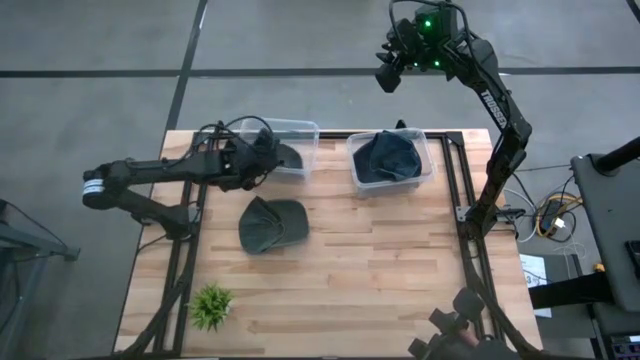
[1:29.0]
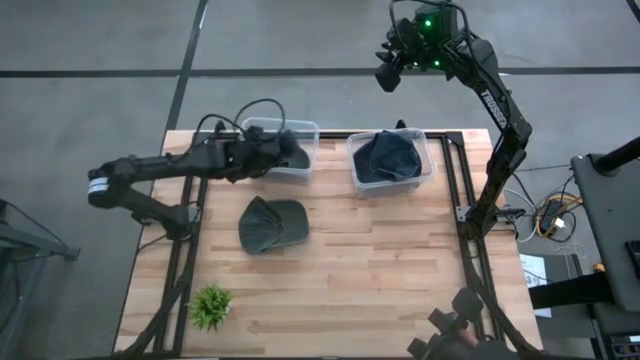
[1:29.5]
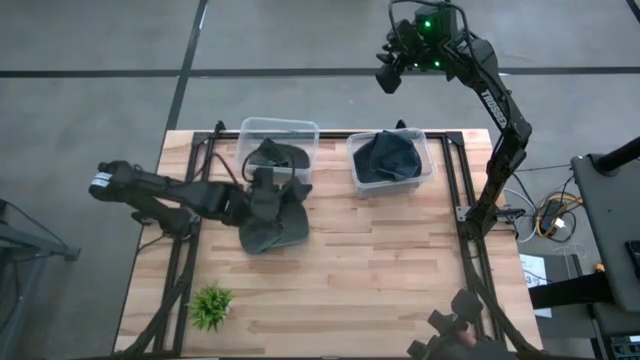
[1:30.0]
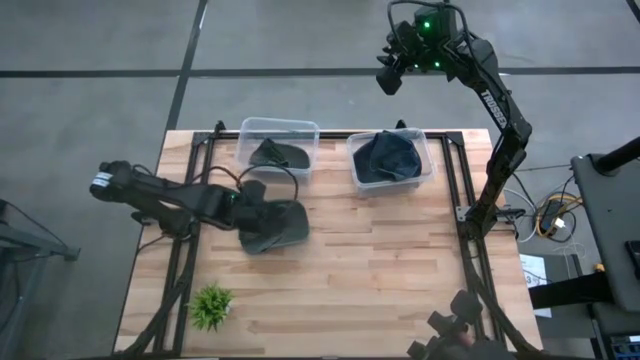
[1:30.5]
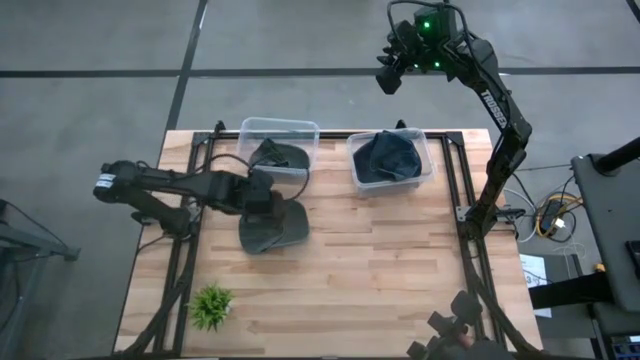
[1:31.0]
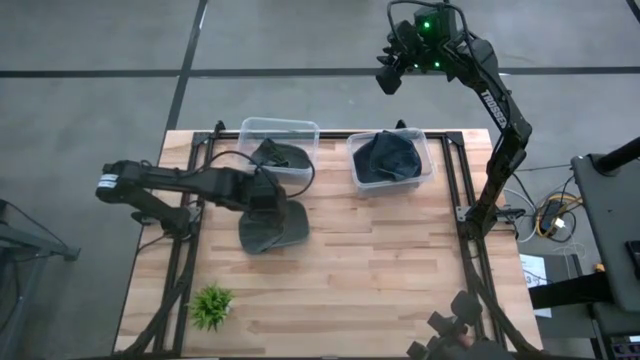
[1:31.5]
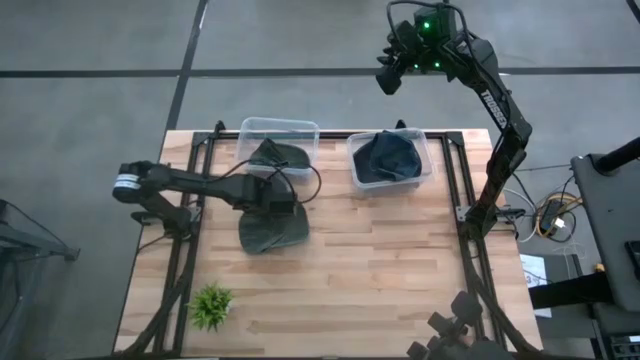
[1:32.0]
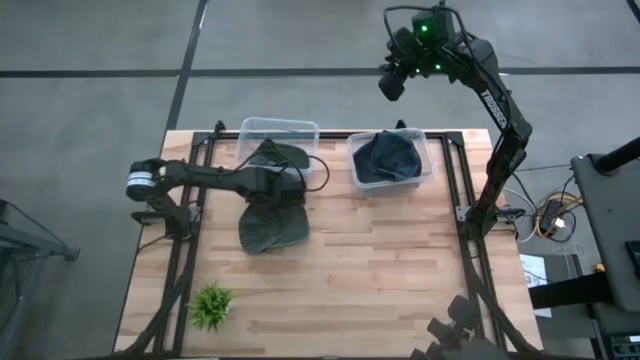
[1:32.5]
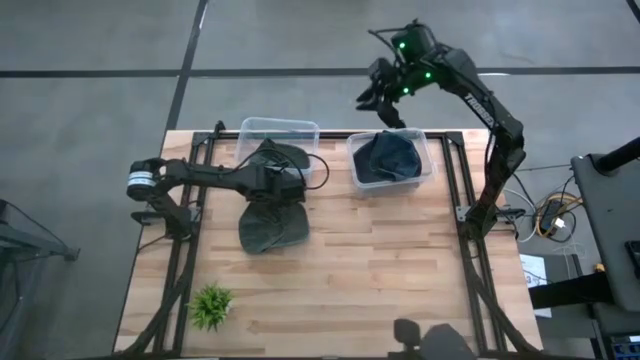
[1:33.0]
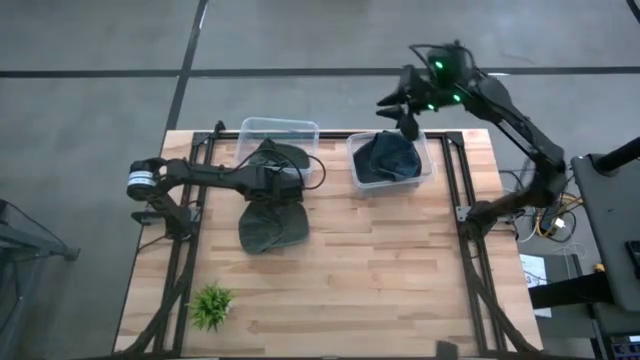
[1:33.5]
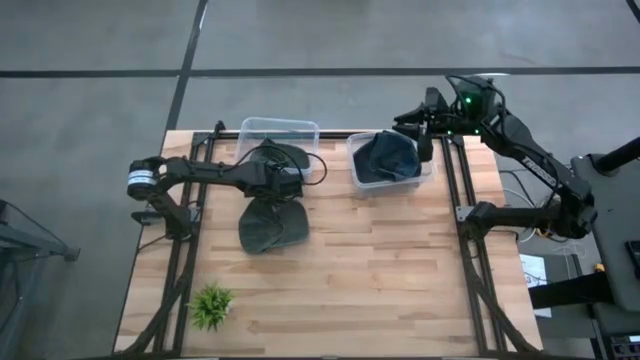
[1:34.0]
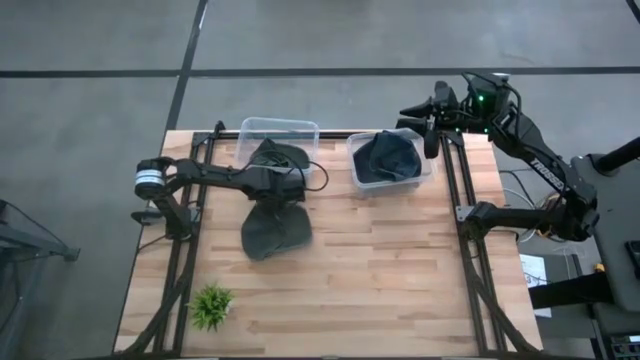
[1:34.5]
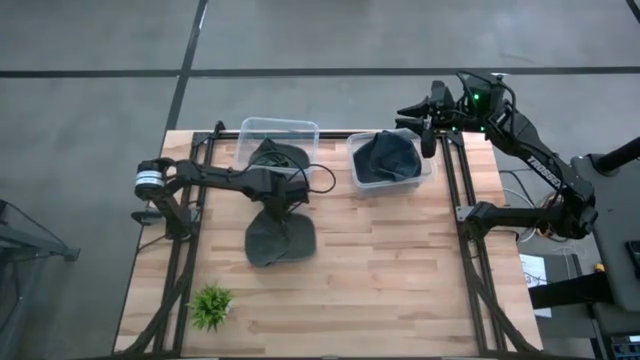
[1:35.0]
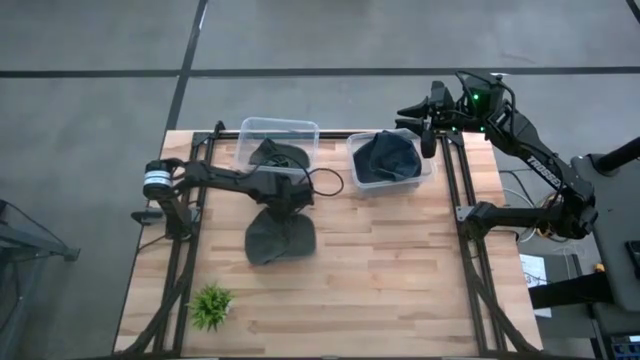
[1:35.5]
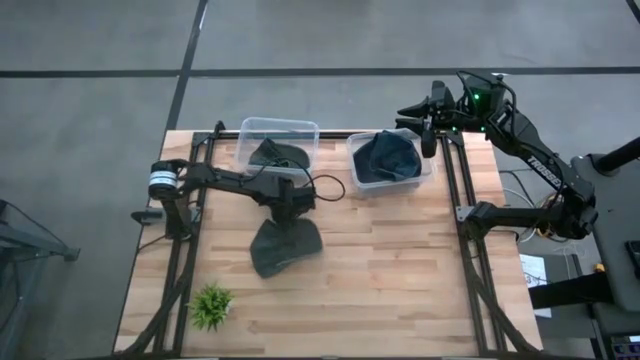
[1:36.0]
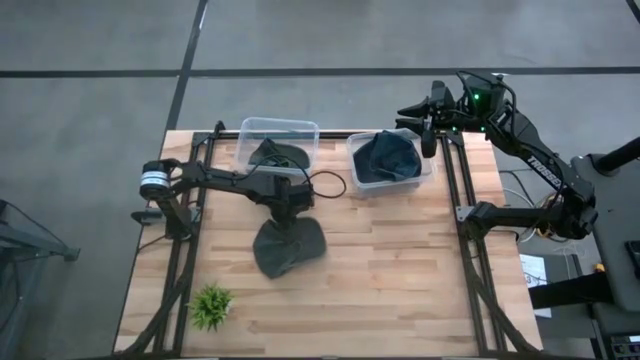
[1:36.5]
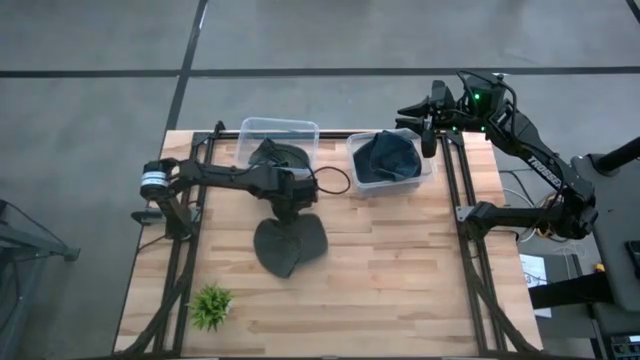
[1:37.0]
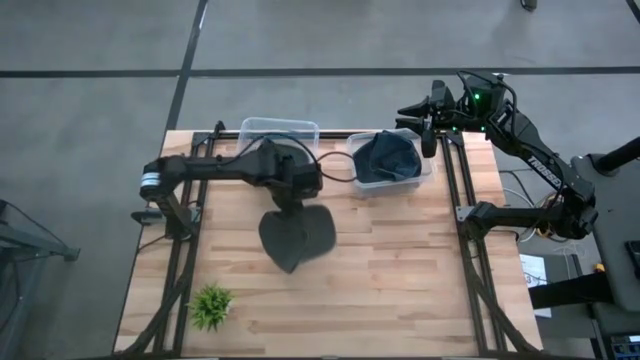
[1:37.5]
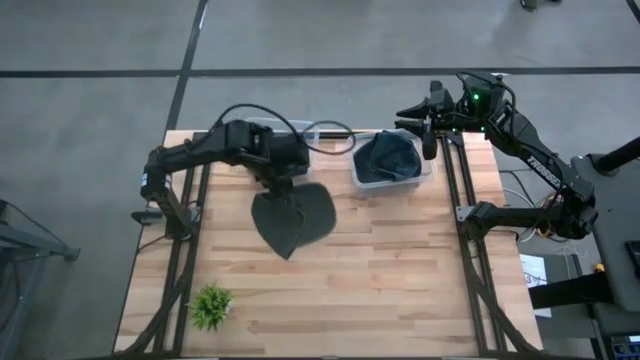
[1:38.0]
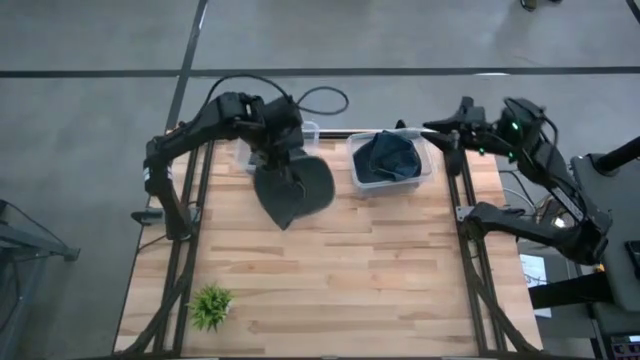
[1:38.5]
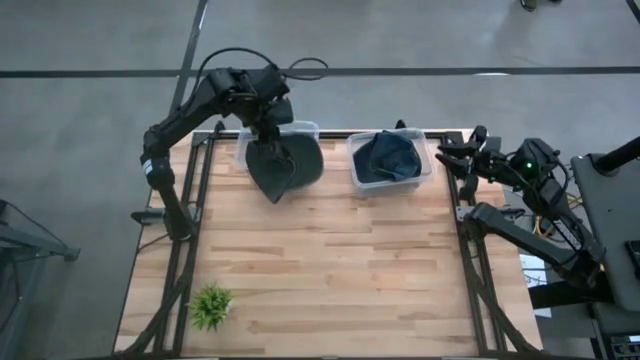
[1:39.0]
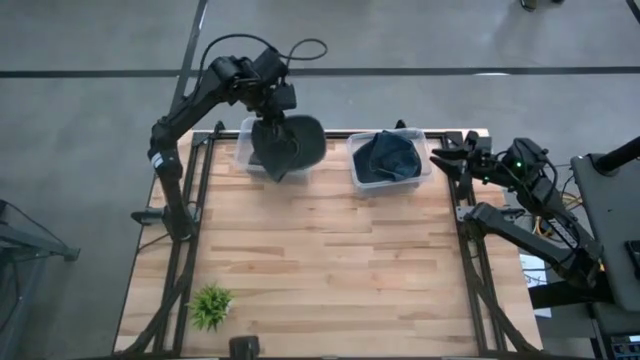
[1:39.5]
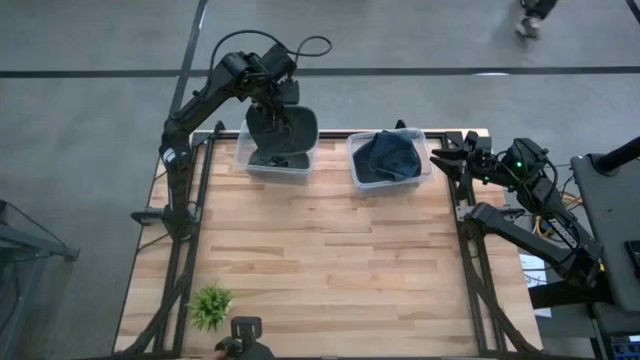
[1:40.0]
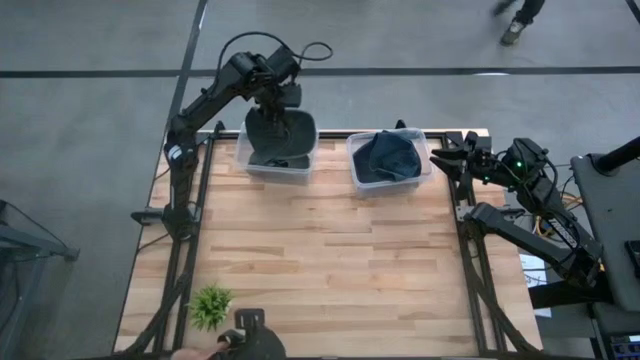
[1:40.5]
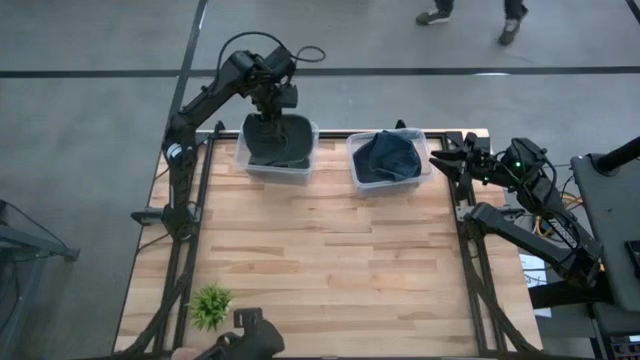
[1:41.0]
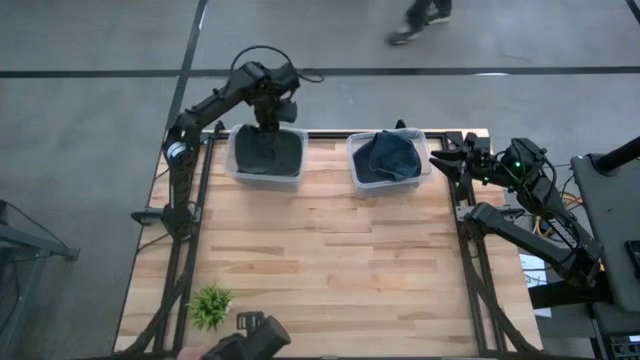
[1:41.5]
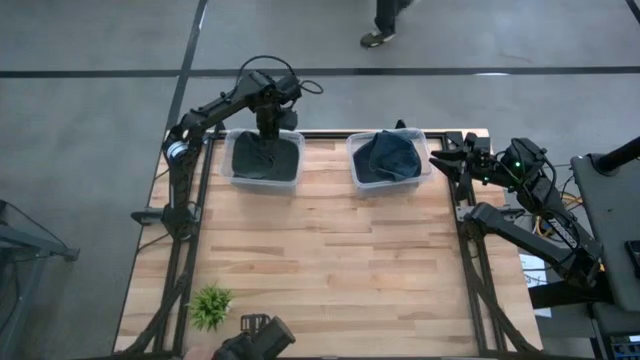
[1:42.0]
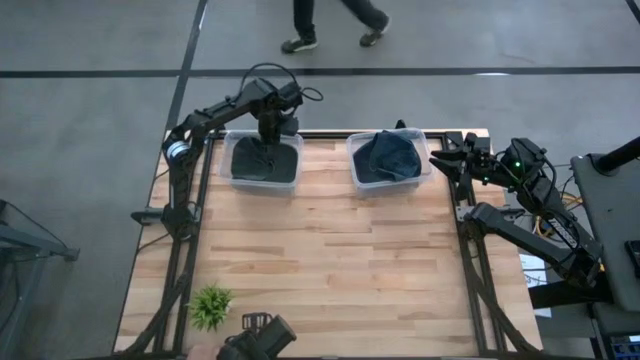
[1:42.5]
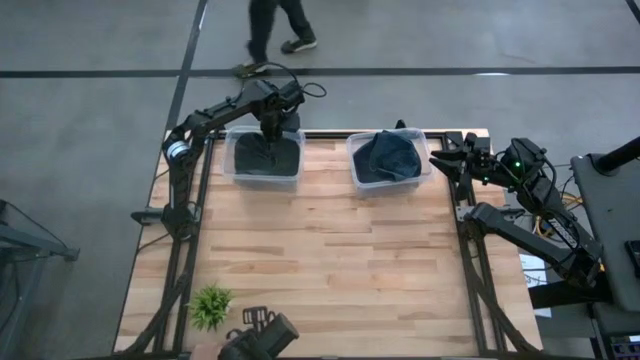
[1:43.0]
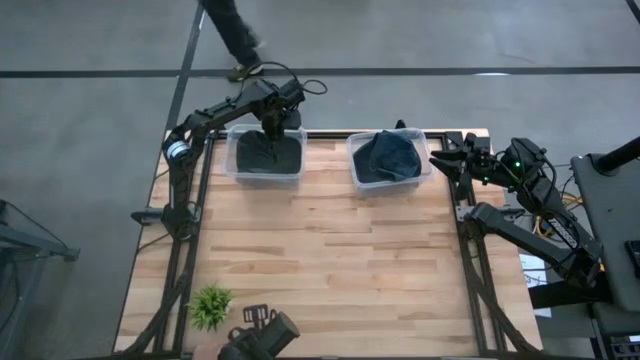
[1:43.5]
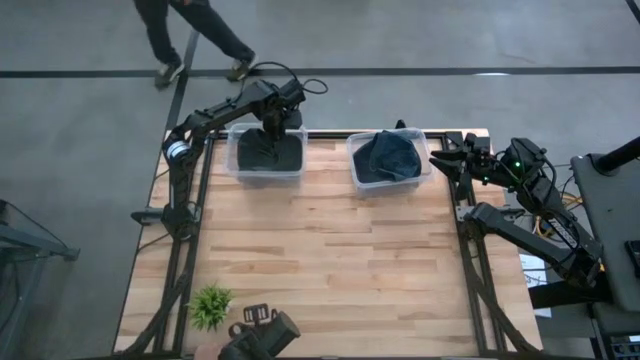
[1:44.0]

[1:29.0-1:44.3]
Task: Pick & Place hat
Put the green cap into the left transparent bin

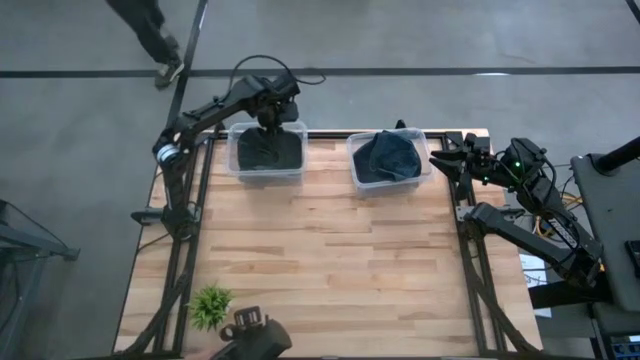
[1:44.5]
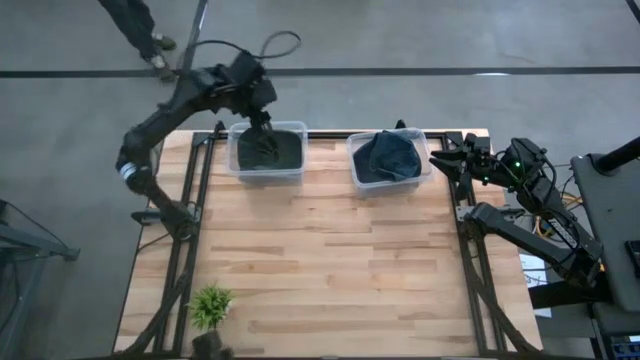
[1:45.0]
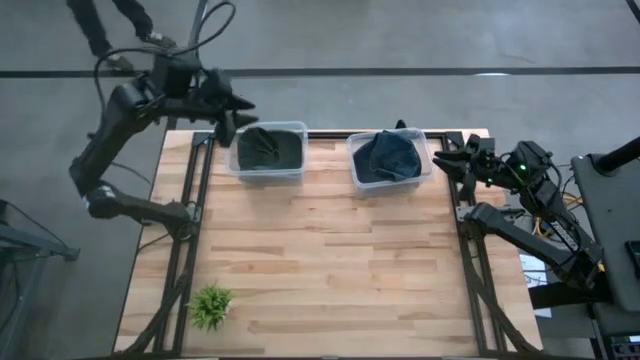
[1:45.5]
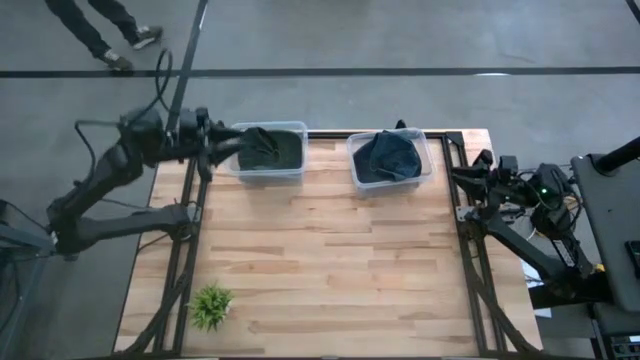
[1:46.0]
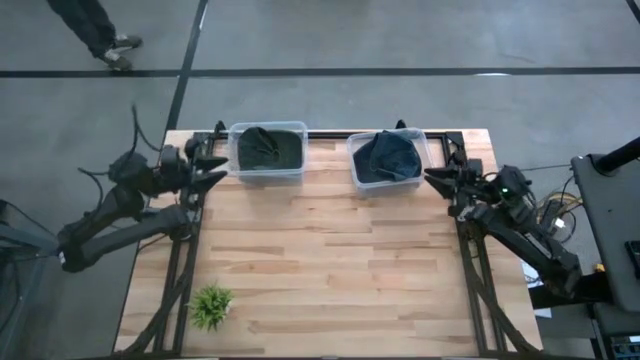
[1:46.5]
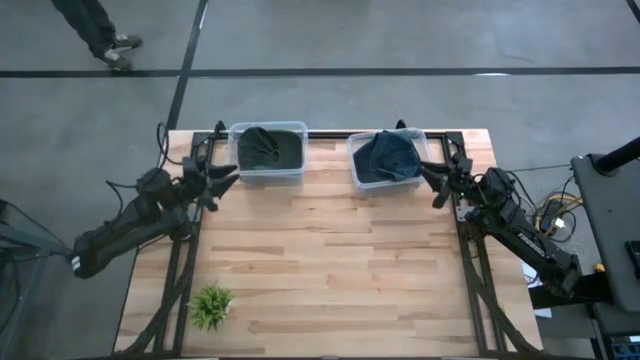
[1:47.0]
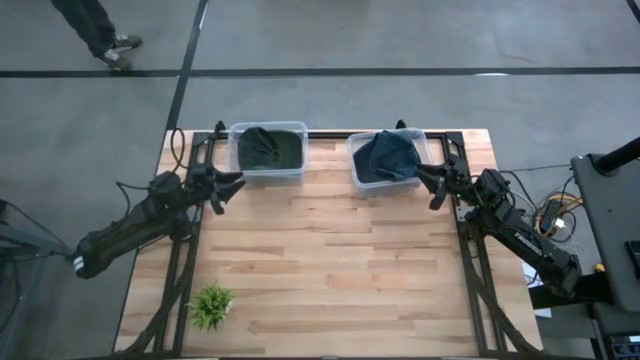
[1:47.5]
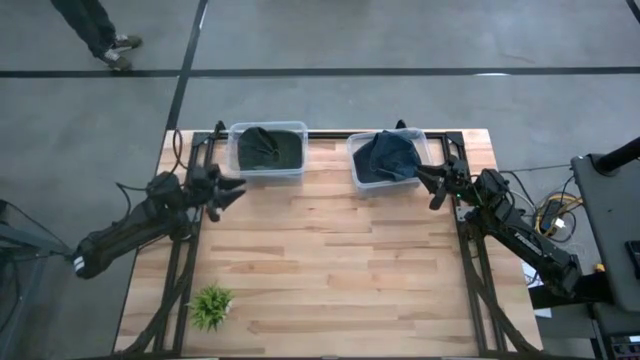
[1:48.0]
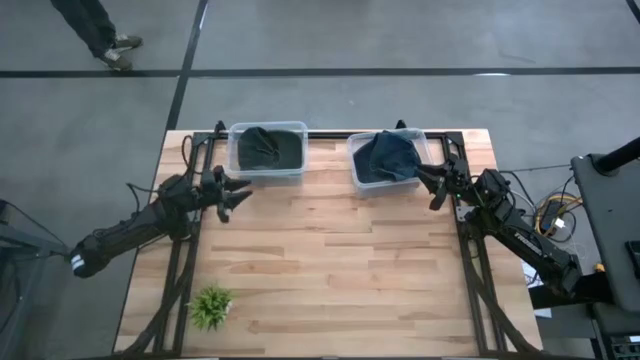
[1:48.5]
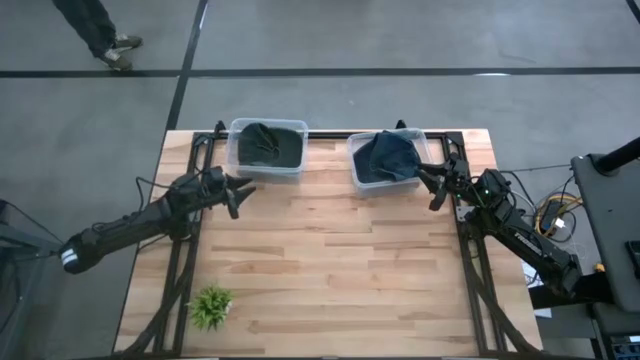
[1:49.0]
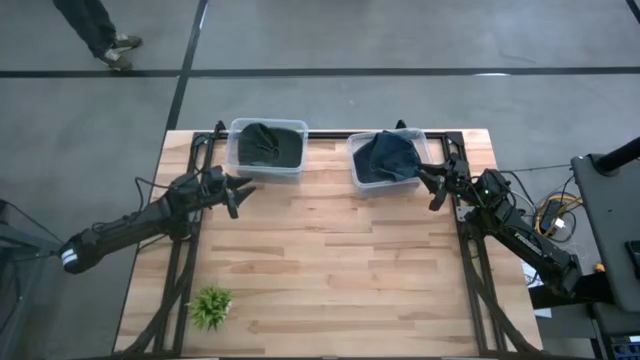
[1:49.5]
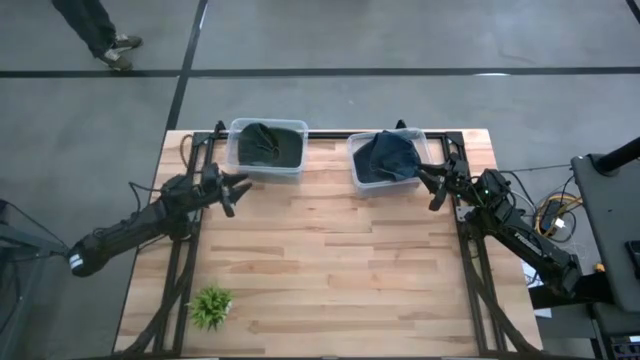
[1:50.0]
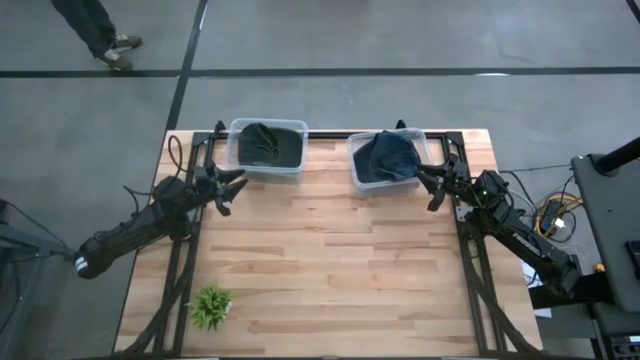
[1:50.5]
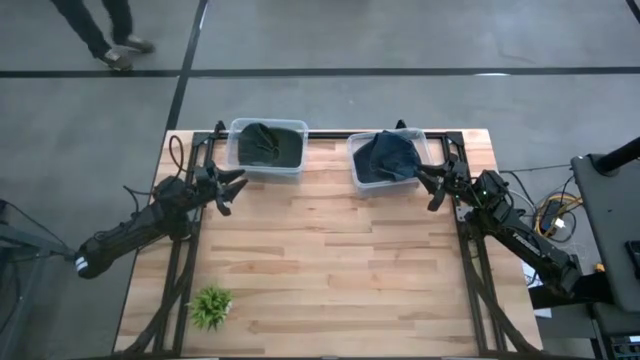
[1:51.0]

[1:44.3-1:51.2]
Return to Home Position
